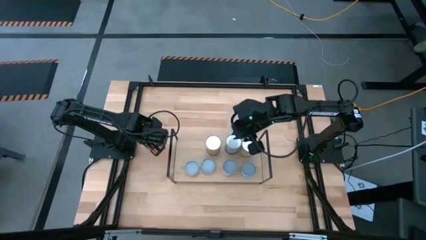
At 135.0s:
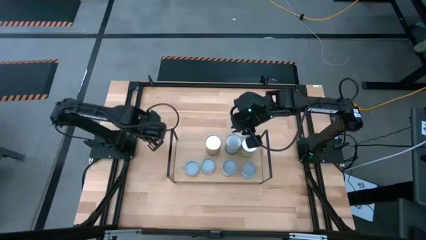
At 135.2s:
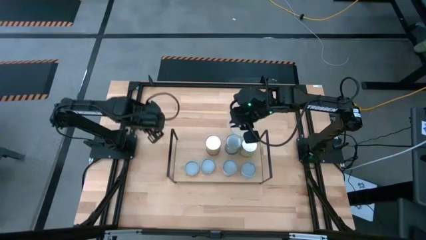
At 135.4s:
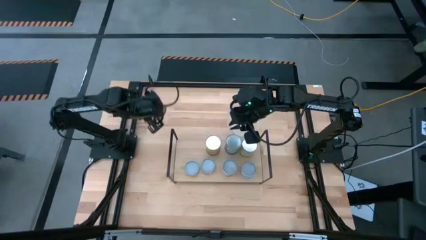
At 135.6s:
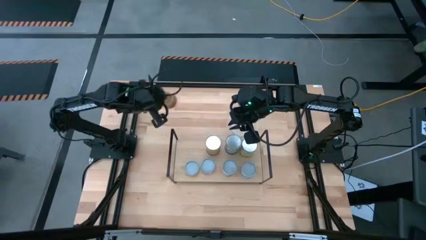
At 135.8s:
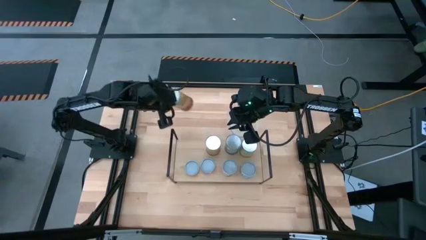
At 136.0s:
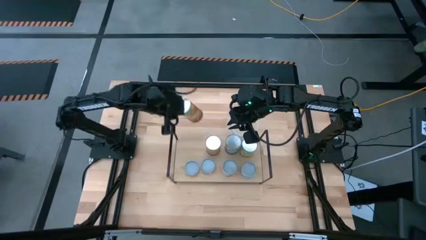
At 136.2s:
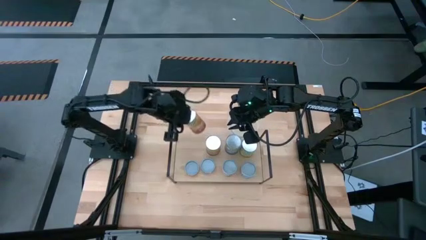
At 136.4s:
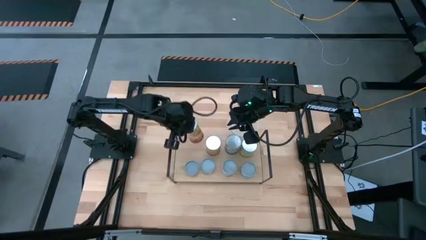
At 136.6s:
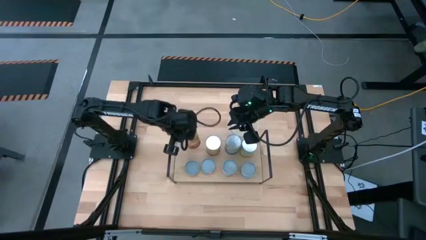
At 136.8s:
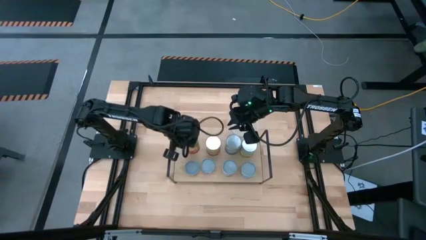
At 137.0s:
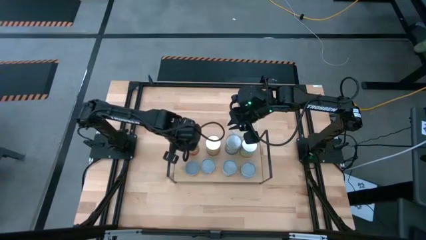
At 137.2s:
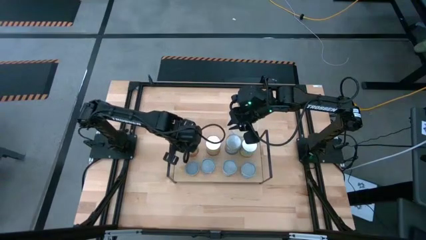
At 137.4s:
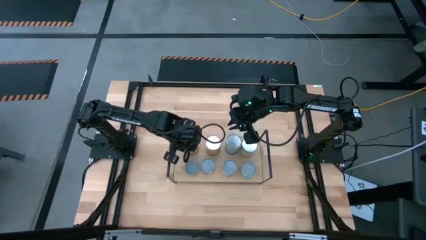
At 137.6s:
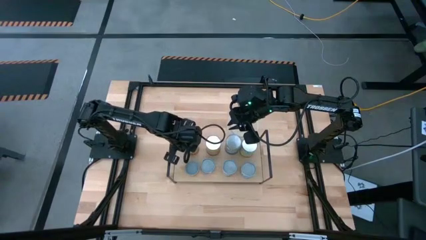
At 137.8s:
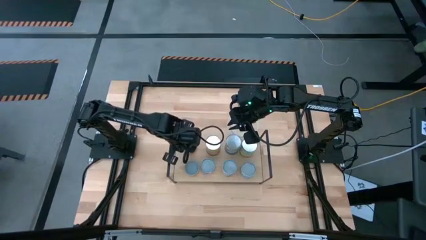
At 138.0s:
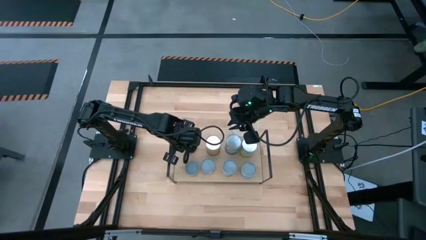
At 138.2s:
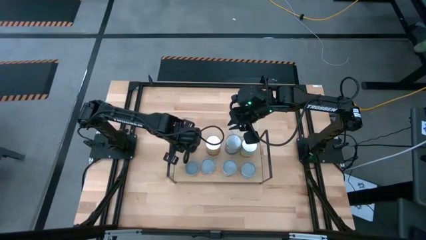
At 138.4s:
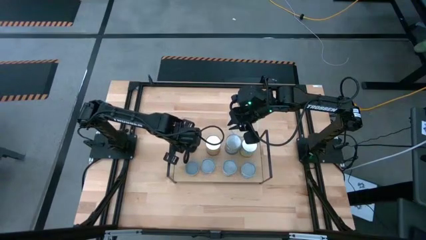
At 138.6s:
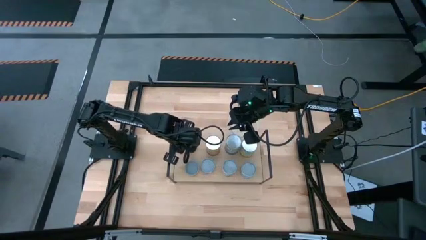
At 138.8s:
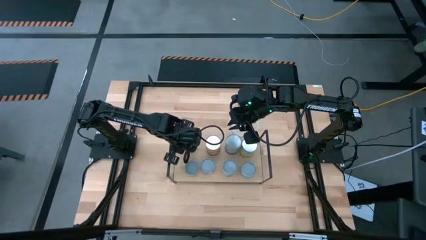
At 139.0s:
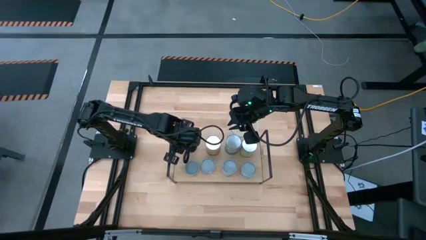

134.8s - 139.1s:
Task: Pick and place cans onto a shelf
Put the canned corns on the shelf

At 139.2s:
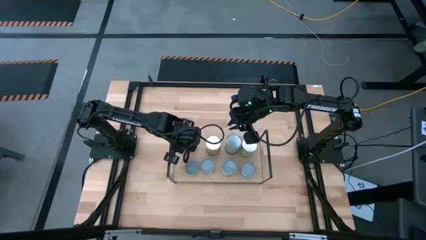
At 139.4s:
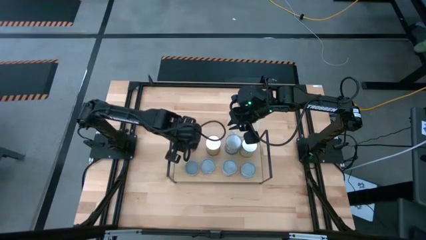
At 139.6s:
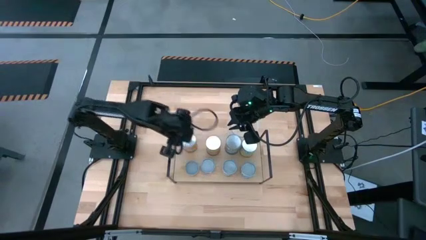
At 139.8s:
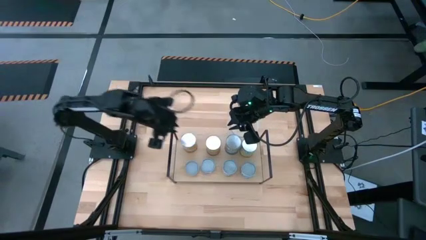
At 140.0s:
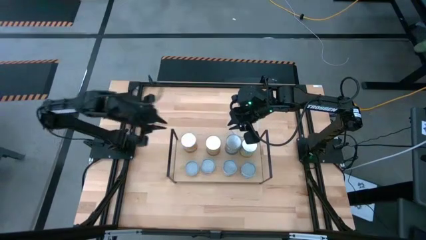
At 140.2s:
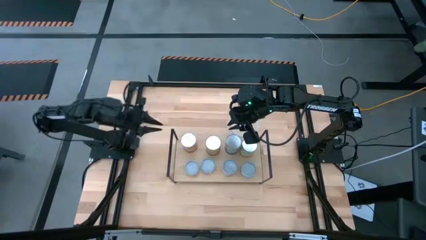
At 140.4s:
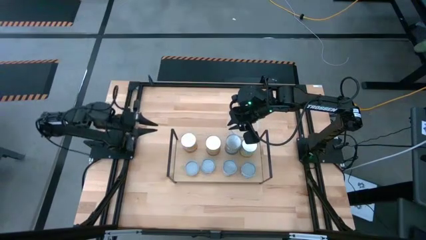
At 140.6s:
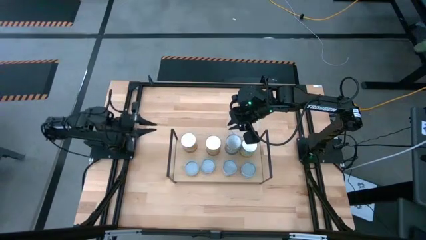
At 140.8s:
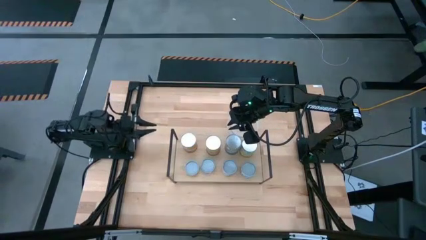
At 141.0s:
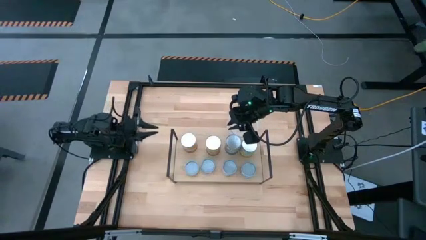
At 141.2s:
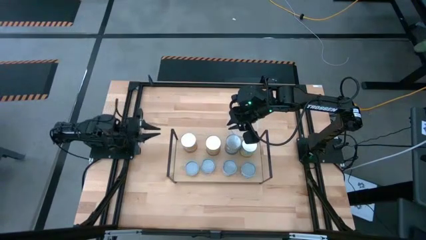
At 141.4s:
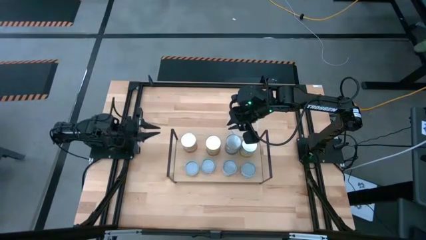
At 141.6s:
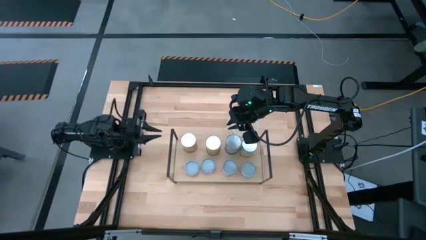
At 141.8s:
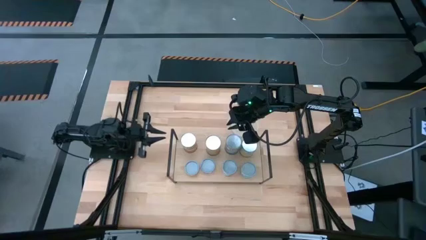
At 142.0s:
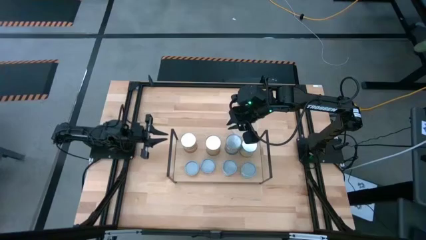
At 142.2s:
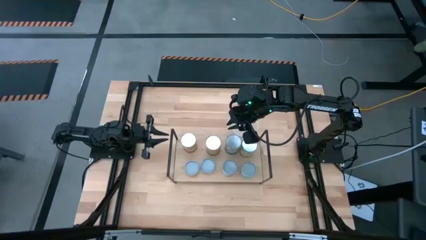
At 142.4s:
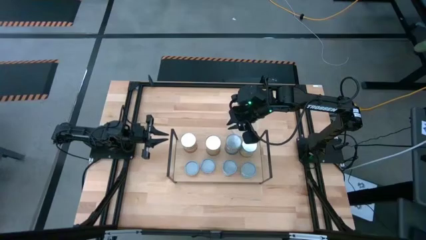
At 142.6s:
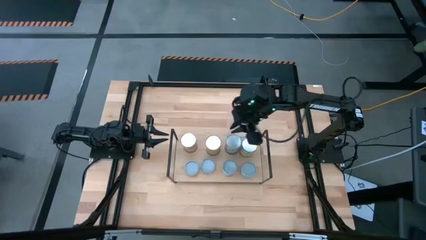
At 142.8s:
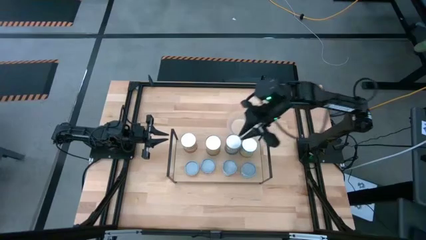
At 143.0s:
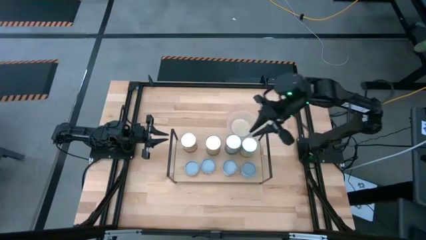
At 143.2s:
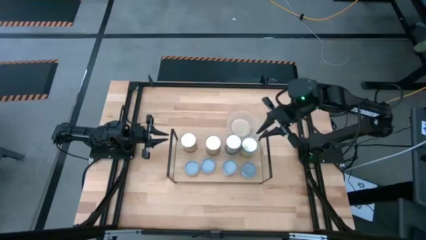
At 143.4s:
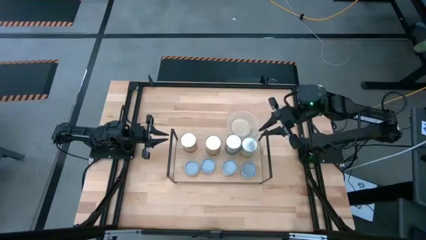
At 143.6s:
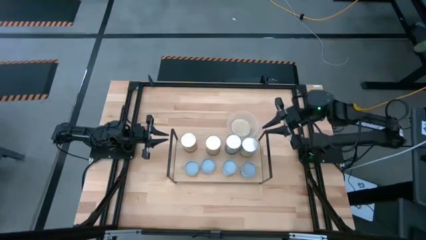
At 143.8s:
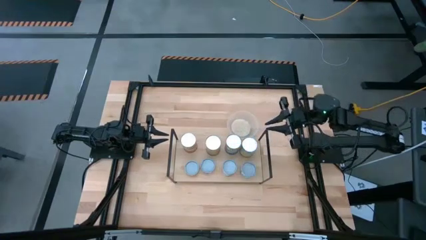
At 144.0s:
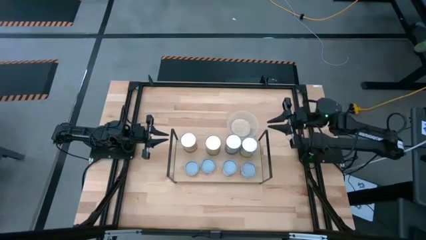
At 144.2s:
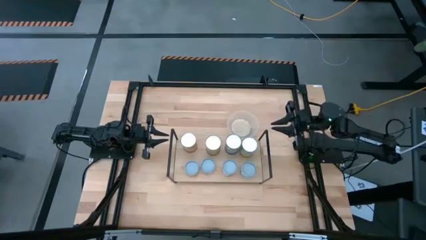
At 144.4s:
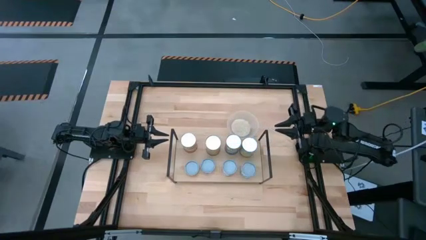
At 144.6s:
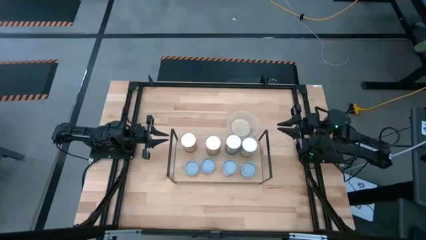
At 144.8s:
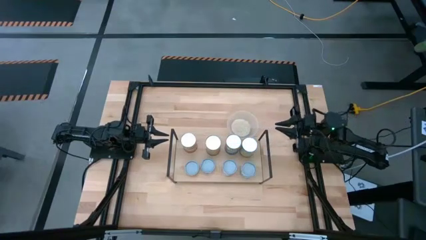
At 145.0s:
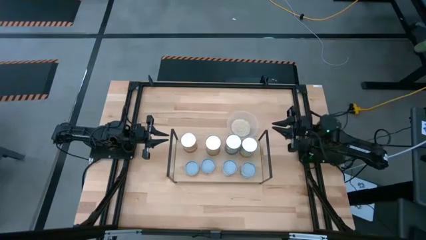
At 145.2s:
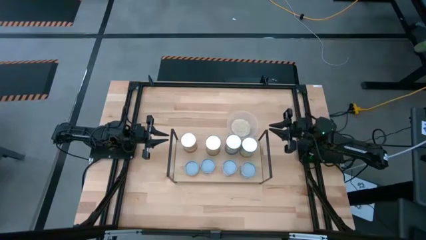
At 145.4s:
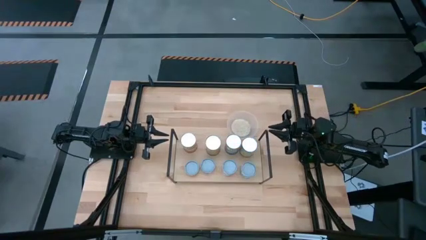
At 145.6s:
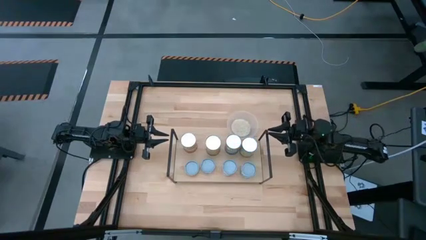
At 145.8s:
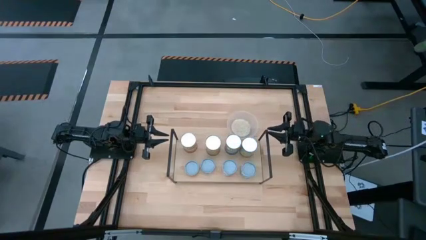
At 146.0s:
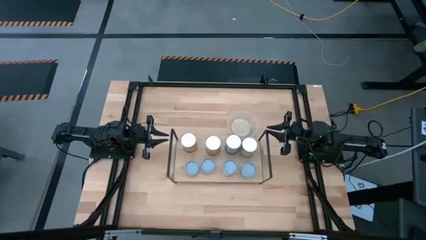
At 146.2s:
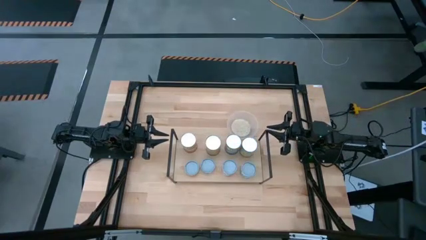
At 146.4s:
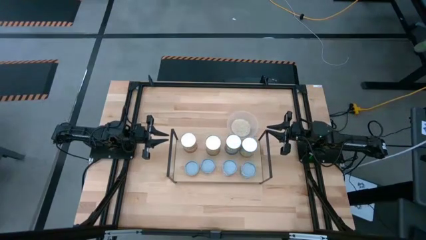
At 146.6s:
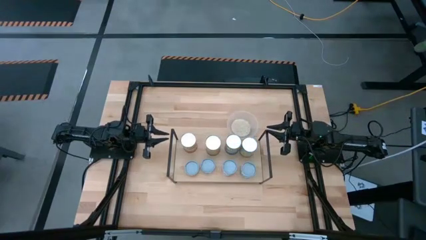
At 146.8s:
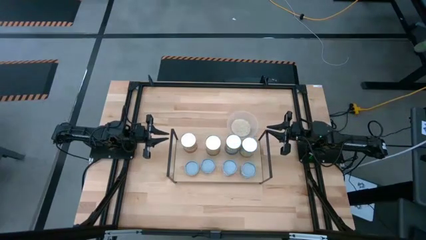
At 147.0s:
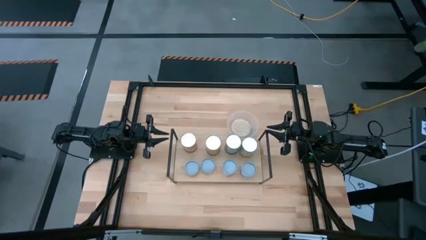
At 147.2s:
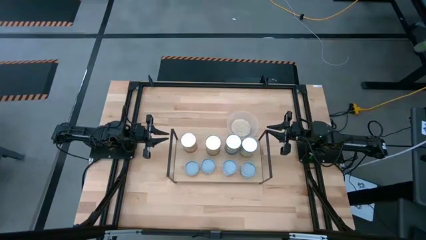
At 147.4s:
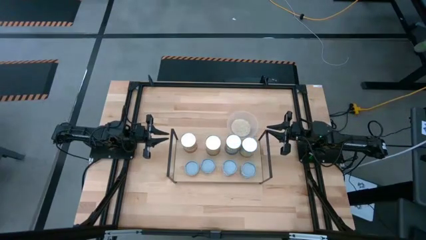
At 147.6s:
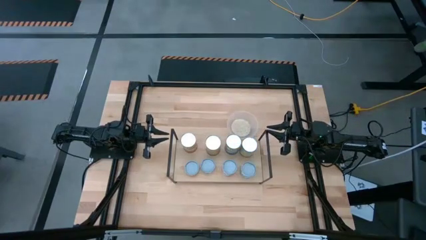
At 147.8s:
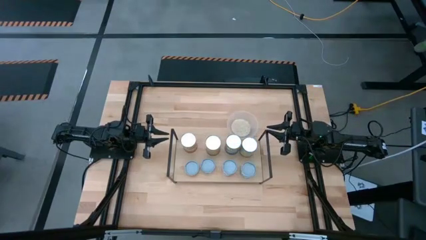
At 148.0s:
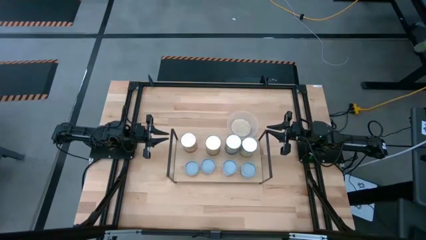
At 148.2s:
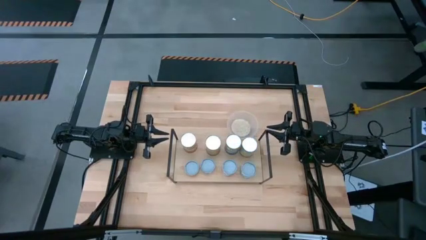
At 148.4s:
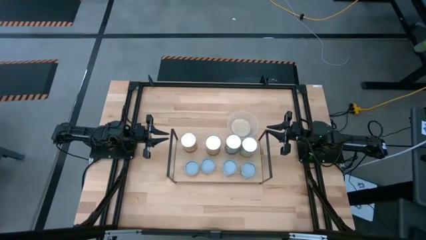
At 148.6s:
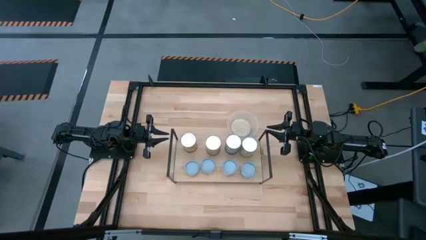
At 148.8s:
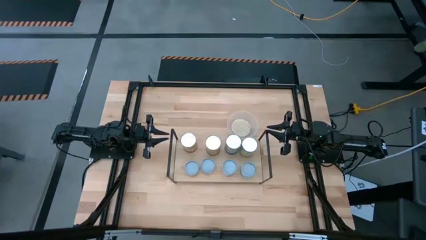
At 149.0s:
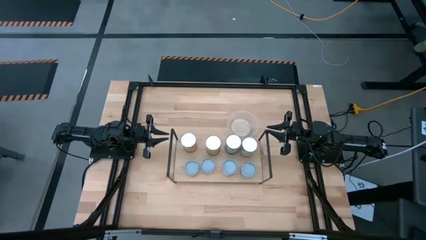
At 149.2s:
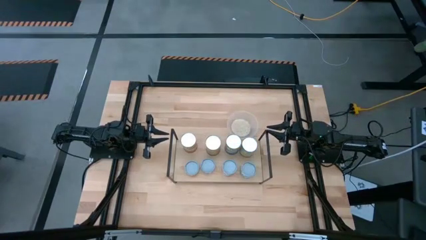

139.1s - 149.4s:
Return to Home Position
